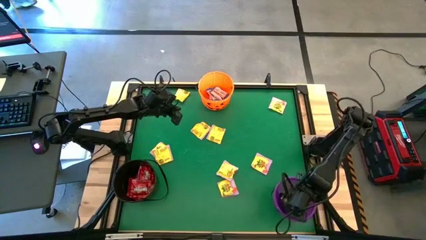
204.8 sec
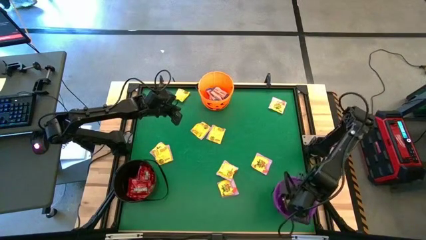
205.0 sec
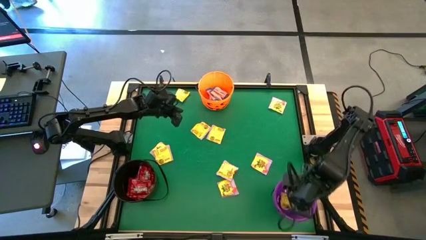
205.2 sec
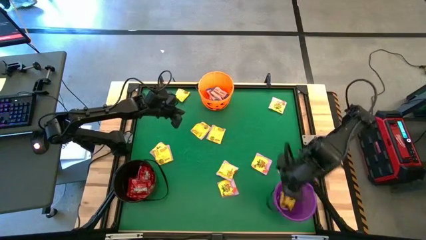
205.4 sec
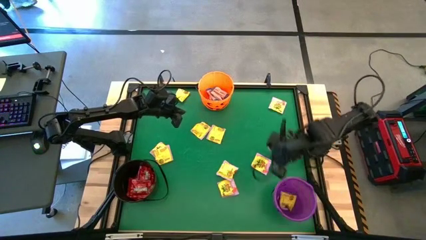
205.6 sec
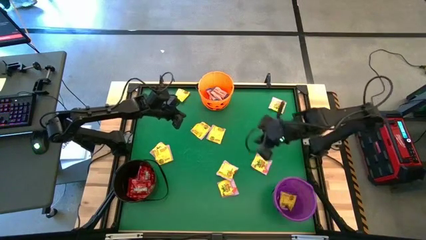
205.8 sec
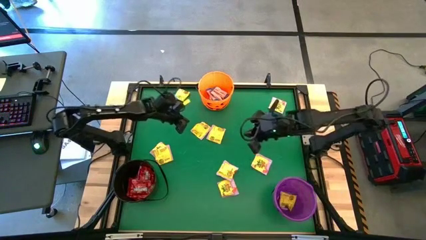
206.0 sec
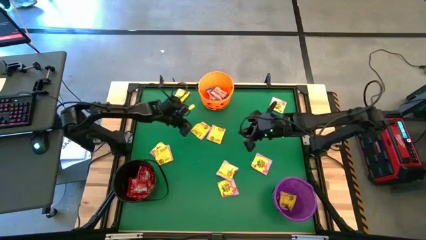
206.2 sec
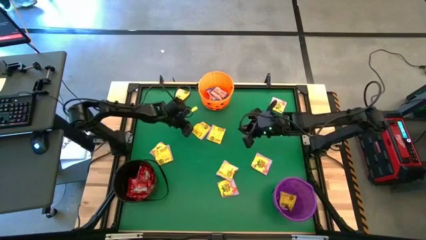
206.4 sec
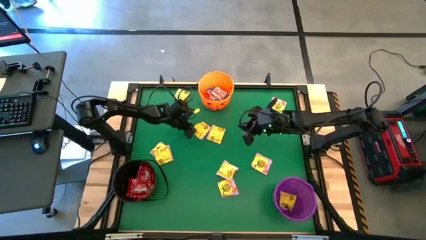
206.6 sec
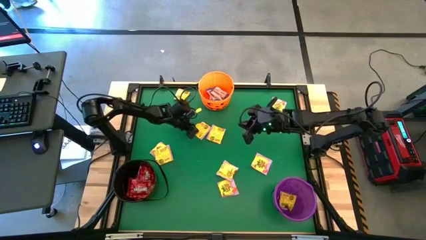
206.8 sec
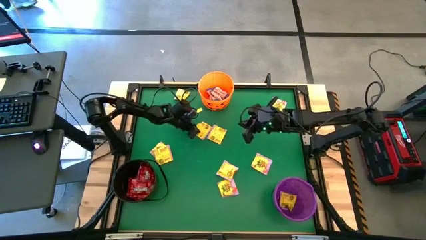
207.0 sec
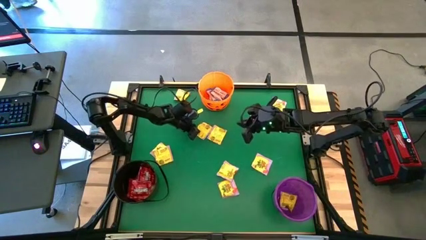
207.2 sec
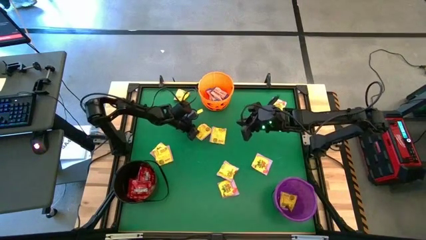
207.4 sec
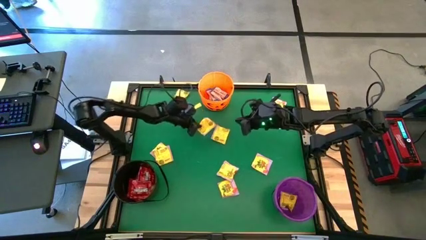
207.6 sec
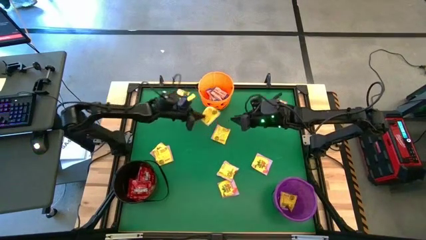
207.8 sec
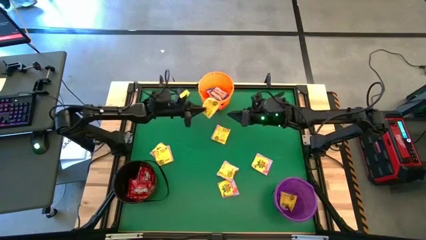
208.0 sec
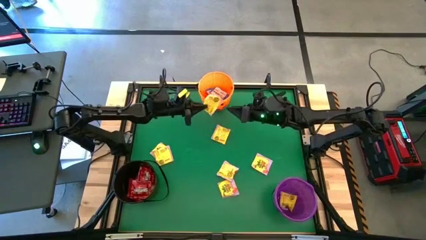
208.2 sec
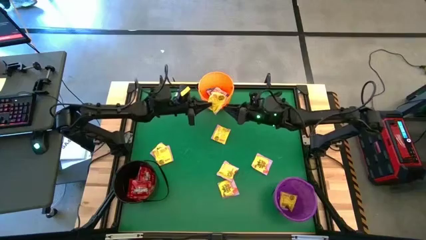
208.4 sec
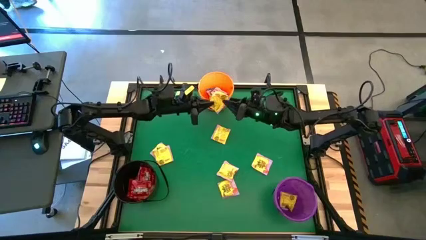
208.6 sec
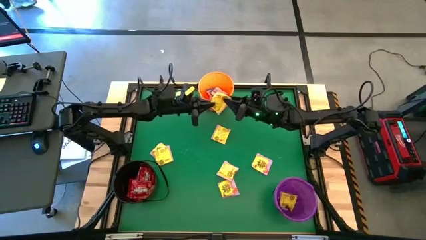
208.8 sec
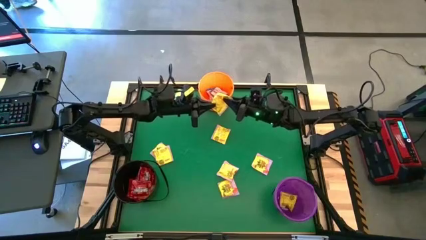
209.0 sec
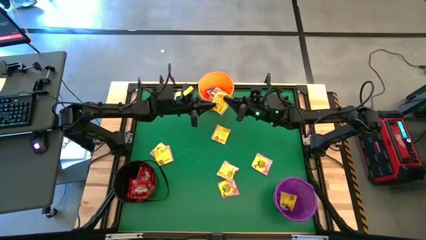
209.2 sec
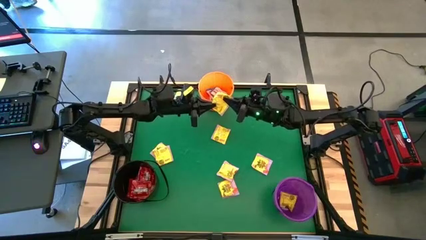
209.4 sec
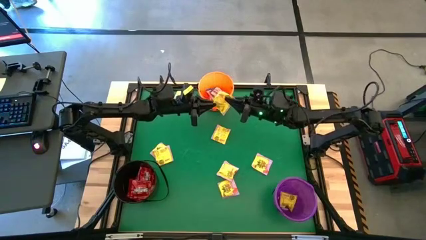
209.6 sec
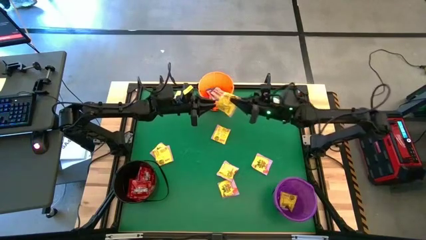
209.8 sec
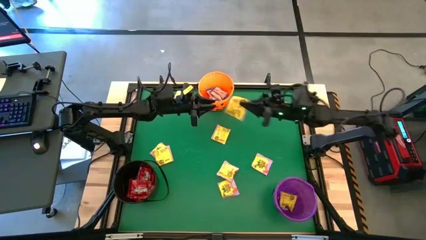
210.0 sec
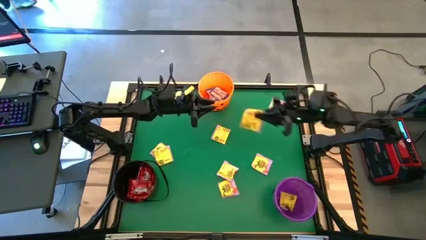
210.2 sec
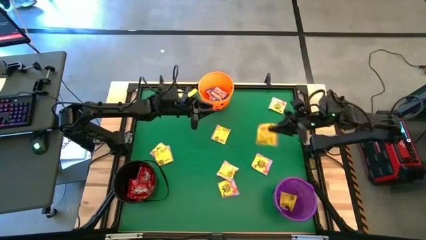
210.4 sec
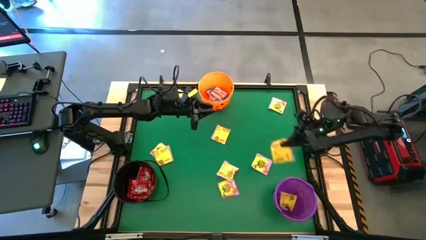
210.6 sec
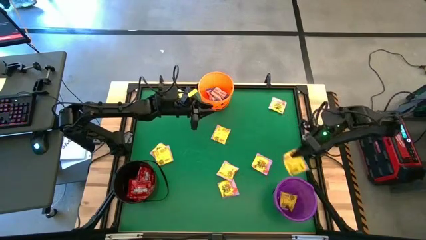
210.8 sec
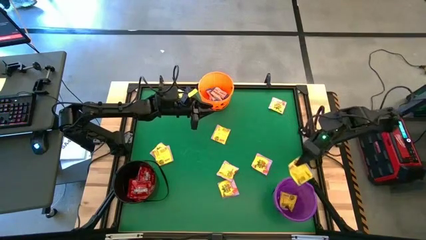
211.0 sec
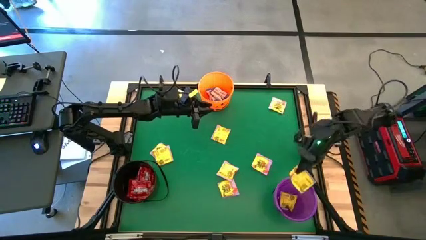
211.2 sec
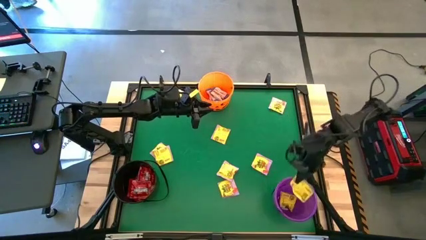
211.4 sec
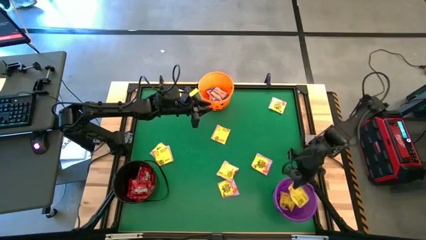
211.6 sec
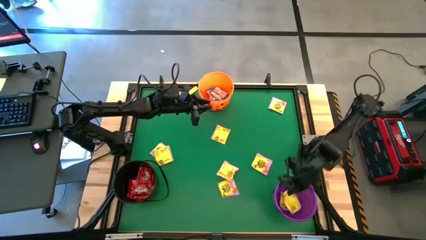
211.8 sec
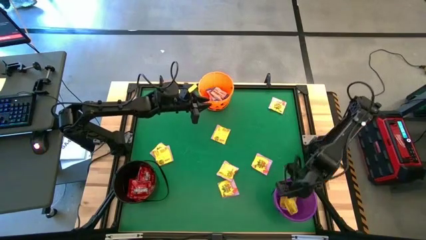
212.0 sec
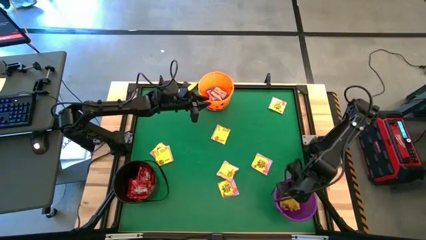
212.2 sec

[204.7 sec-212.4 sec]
Task: Sort candy by brand, put in halloween buckets
Put the yellow candy into the purple bucket

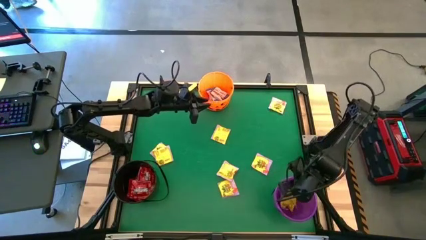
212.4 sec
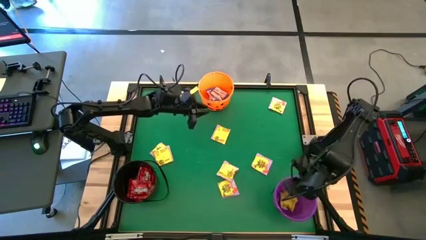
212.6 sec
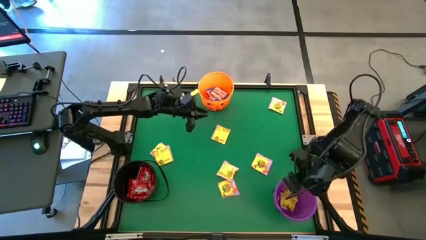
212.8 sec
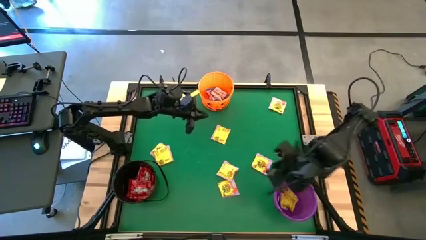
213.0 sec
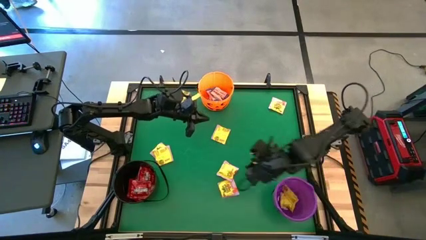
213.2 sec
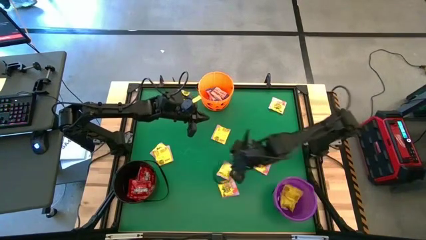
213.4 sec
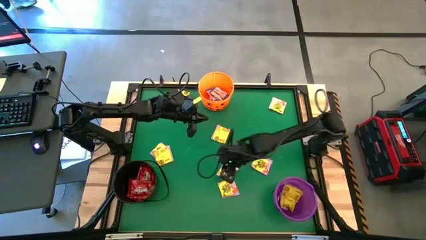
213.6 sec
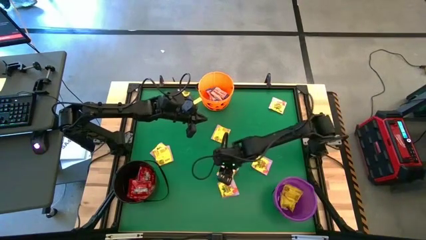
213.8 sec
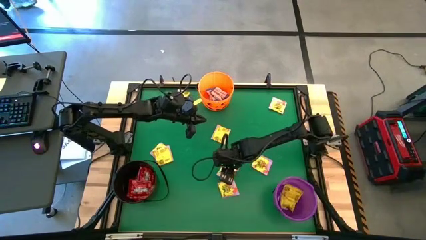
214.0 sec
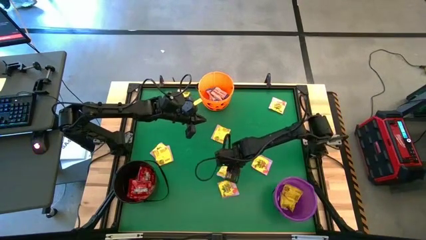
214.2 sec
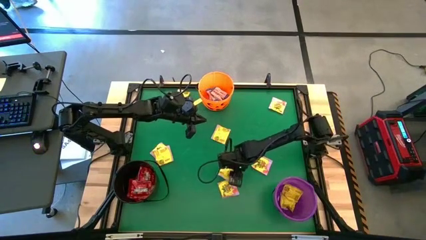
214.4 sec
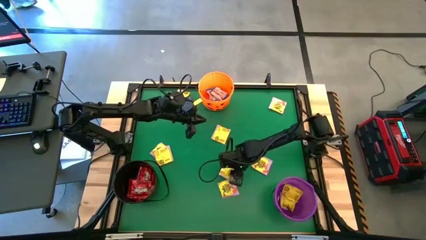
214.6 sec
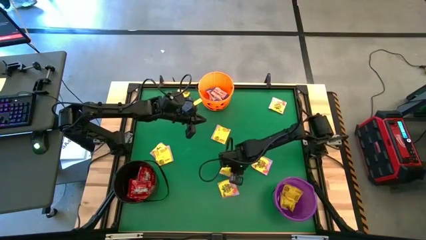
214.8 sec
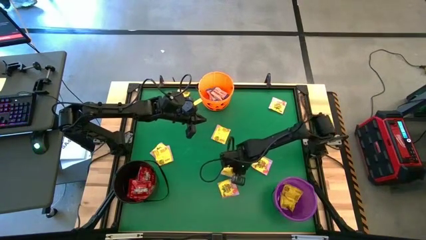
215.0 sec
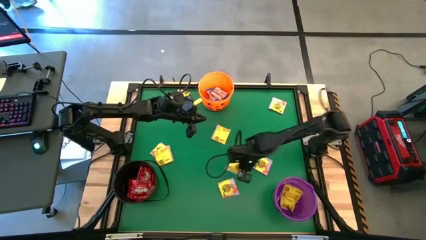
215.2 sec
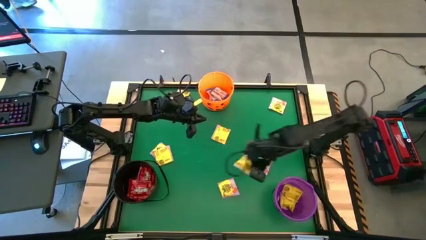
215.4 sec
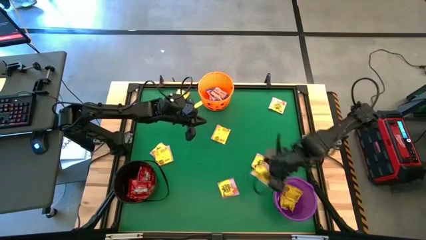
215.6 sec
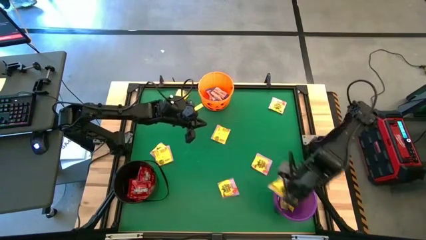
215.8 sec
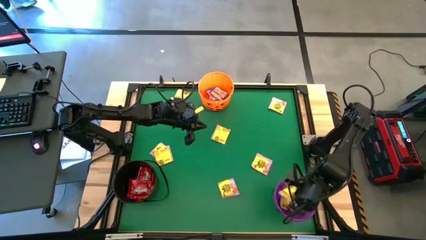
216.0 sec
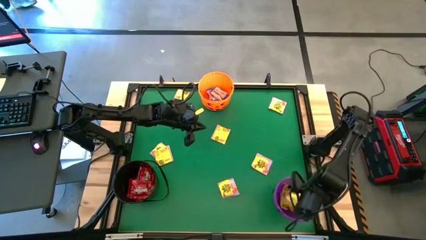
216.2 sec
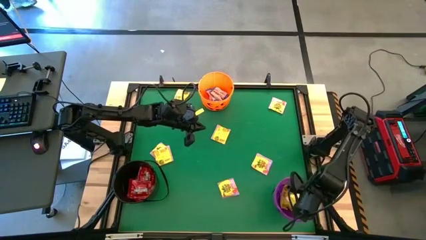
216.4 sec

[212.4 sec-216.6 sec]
Put the yellow candy into the purple bucket

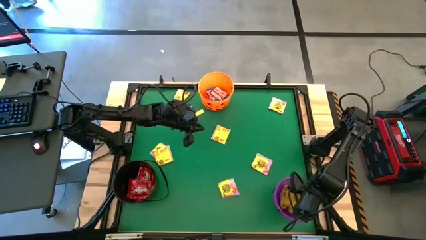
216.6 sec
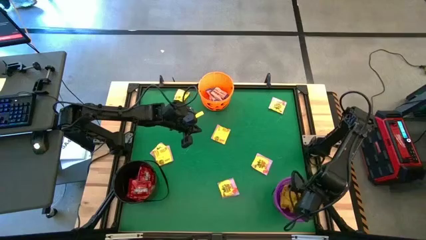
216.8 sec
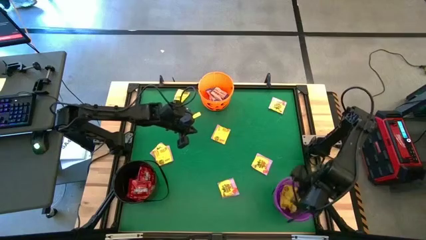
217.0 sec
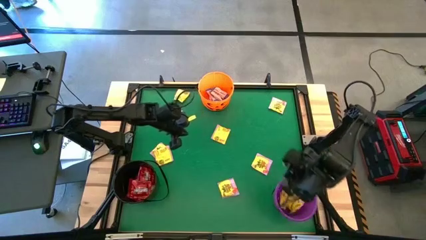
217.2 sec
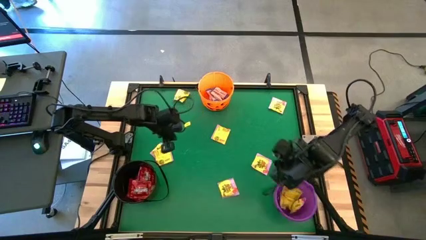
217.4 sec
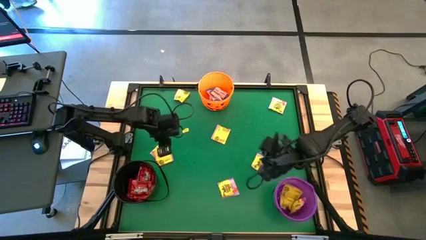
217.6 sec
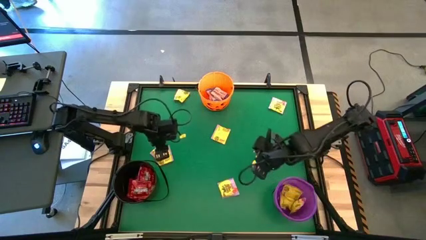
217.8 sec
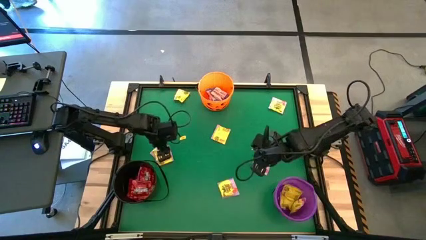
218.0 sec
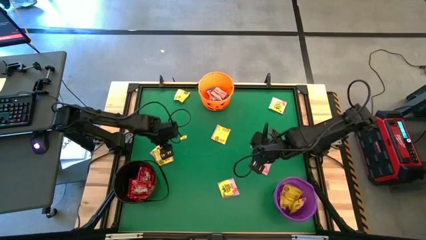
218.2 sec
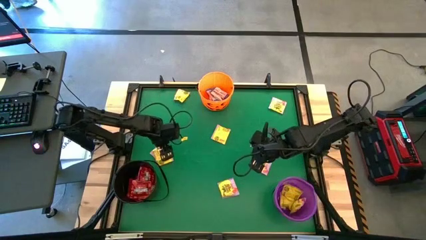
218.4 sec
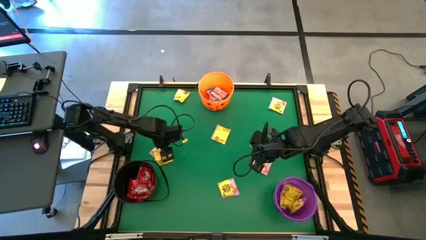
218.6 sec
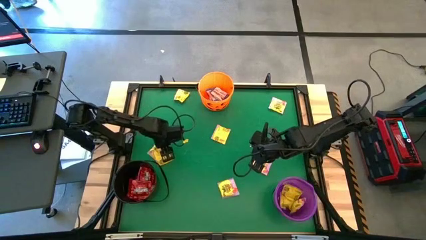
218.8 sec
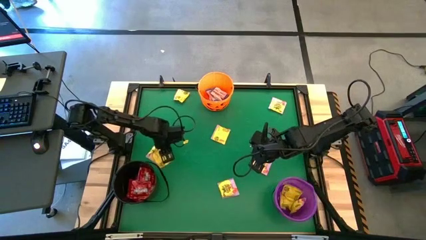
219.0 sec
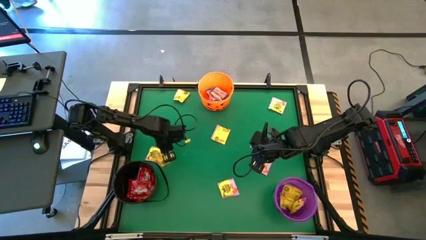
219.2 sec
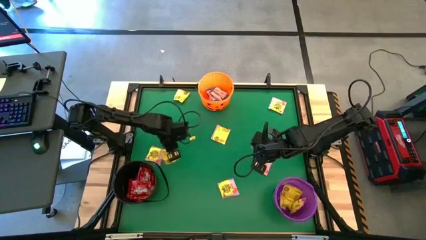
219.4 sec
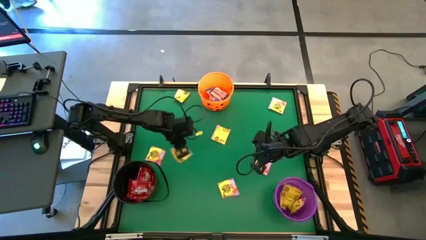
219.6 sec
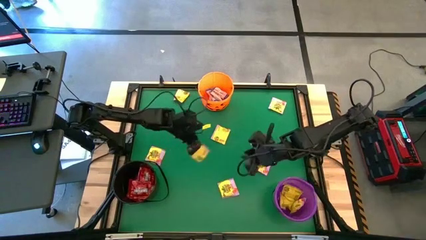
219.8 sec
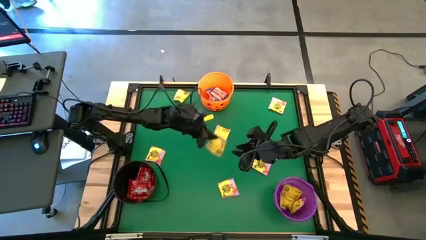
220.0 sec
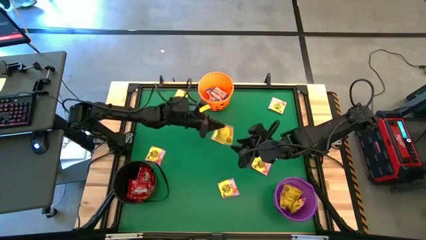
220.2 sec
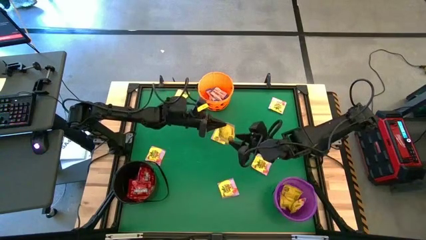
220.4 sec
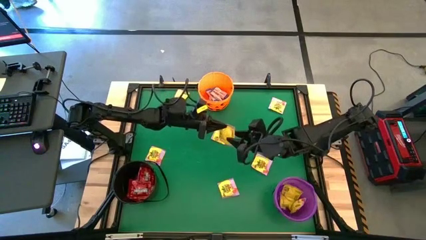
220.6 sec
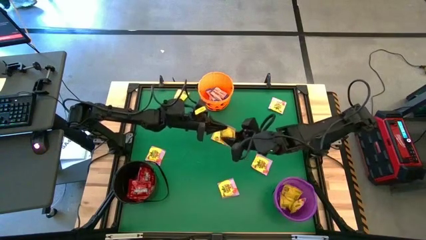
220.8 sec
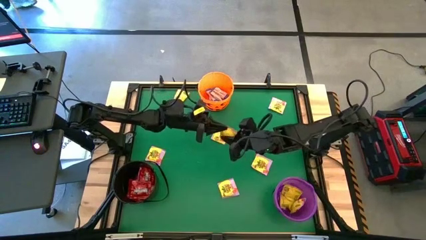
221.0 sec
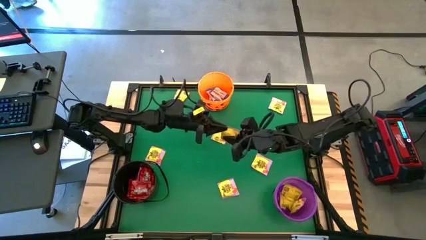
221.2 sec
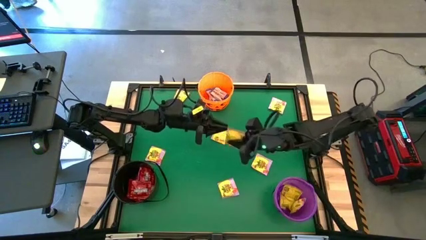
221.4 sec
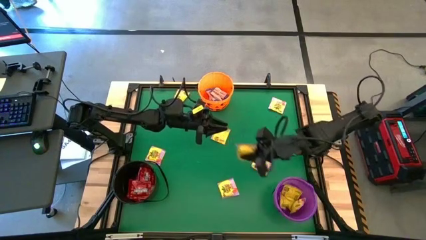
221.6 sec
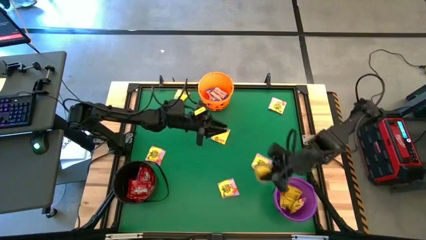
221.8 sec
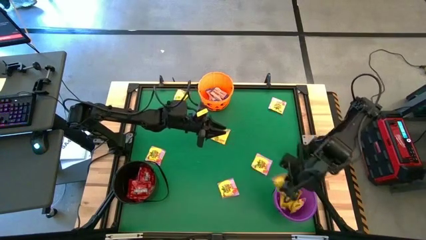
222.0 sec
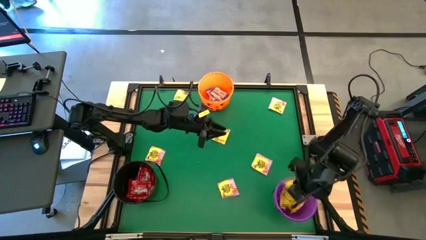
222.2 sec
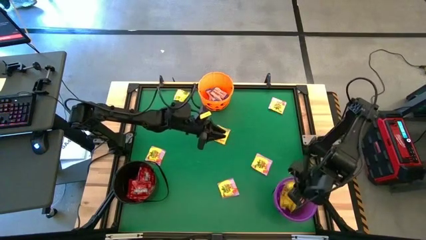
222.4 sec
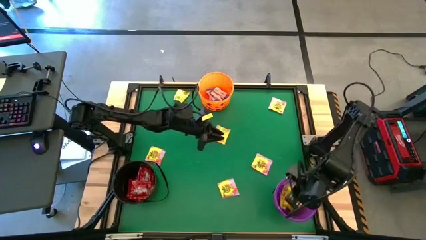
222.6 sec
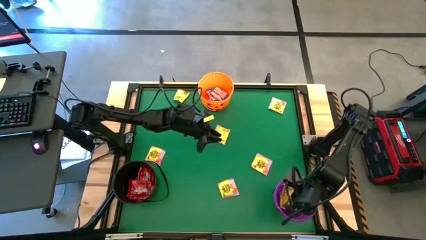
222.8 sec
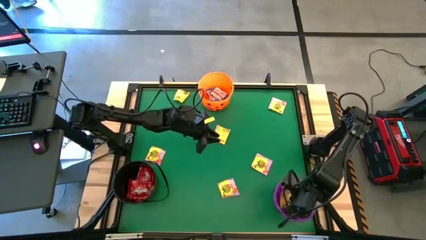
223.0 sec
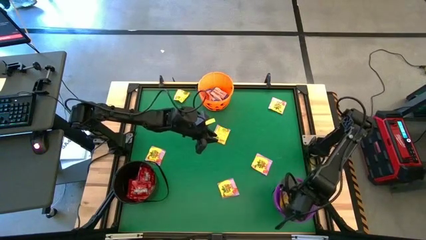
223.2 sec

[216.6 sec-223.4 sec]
Put the yellow candy into the purple bucket
